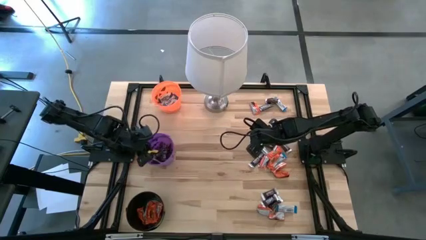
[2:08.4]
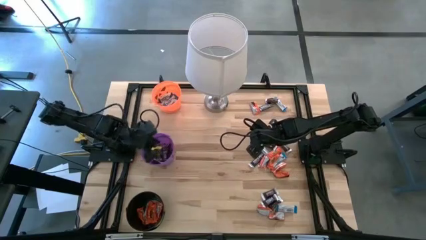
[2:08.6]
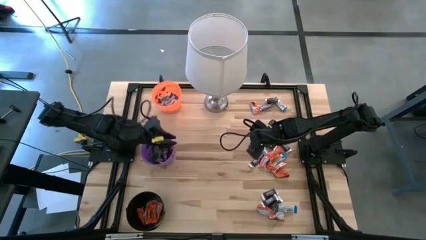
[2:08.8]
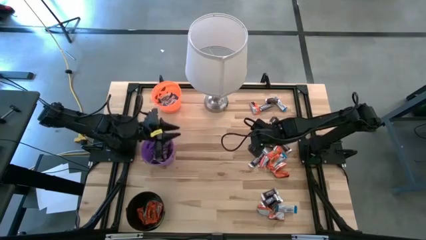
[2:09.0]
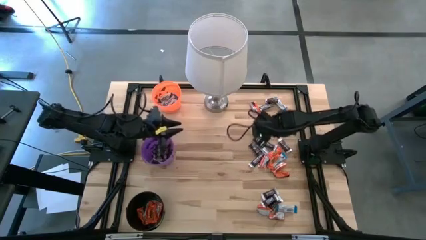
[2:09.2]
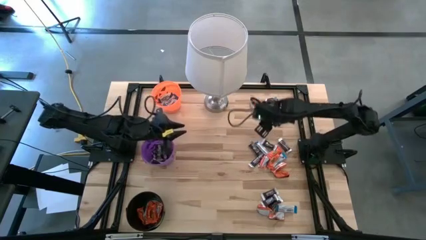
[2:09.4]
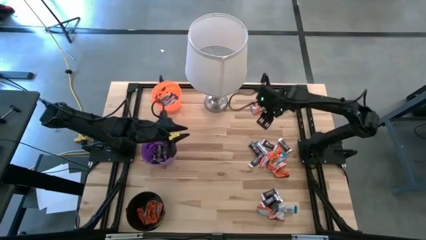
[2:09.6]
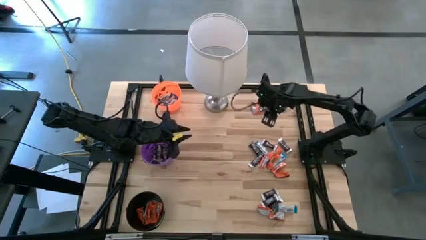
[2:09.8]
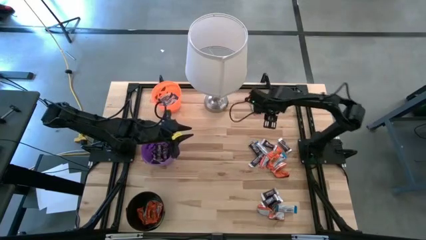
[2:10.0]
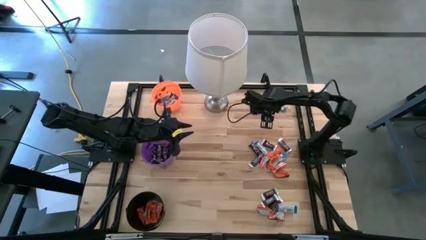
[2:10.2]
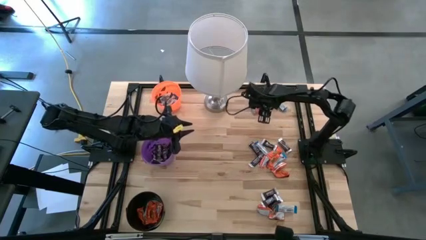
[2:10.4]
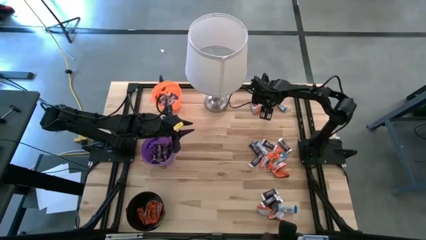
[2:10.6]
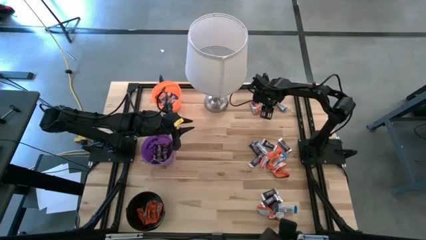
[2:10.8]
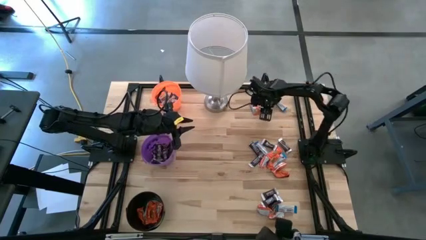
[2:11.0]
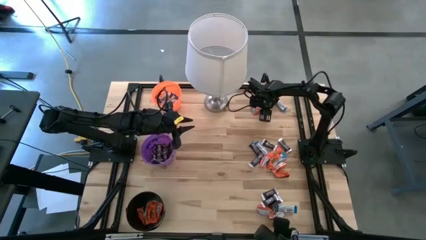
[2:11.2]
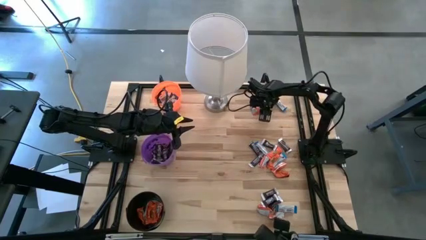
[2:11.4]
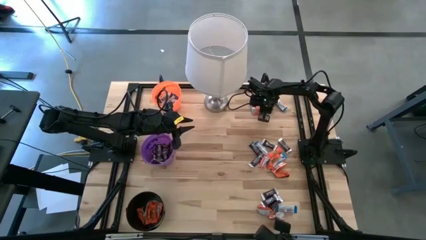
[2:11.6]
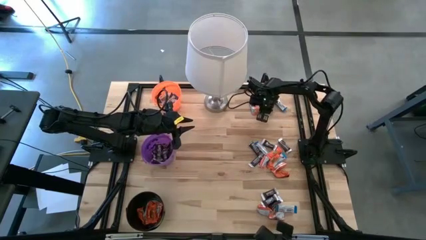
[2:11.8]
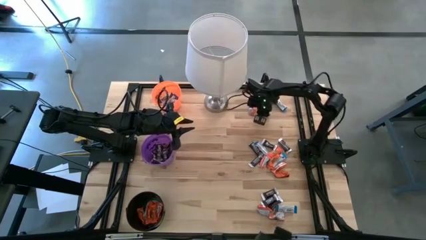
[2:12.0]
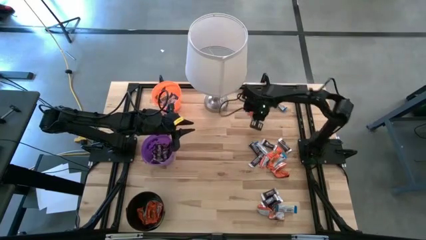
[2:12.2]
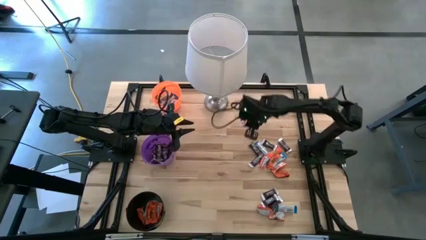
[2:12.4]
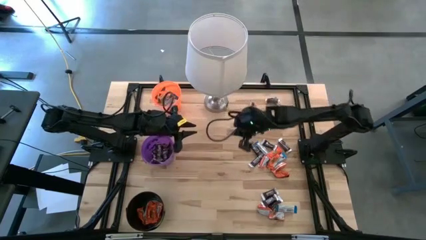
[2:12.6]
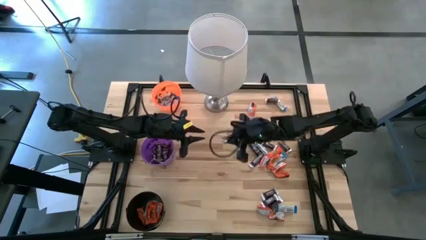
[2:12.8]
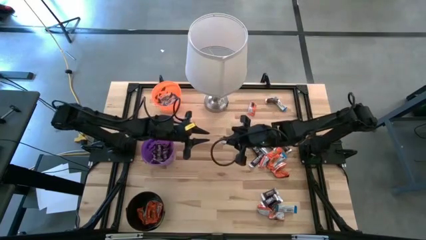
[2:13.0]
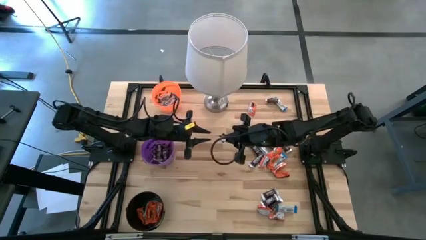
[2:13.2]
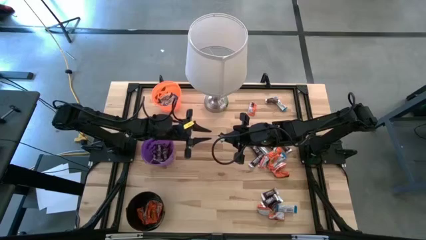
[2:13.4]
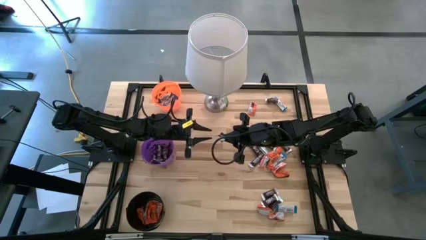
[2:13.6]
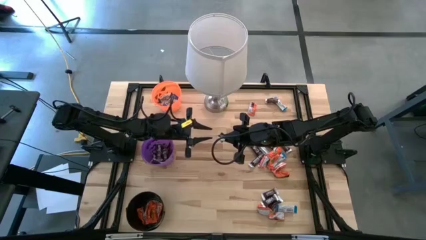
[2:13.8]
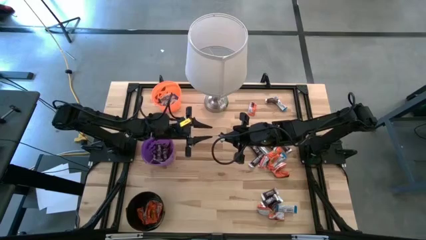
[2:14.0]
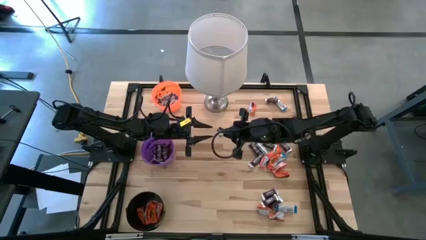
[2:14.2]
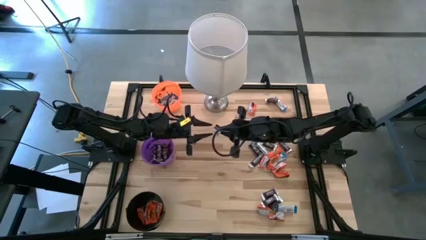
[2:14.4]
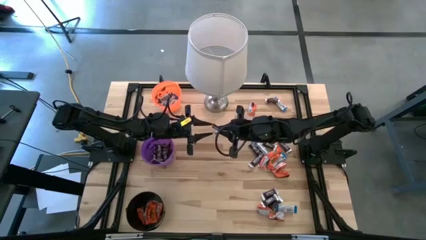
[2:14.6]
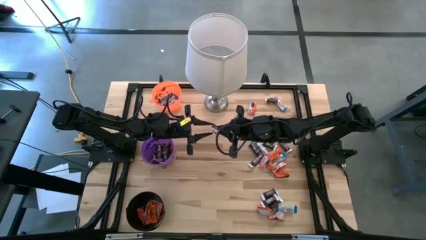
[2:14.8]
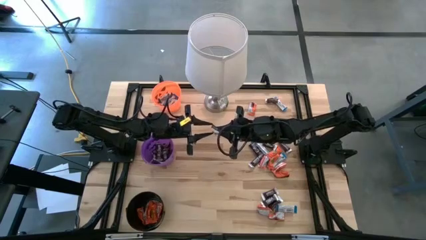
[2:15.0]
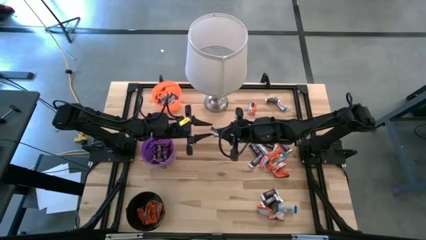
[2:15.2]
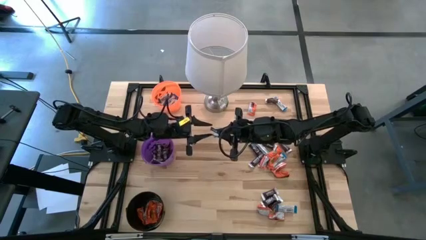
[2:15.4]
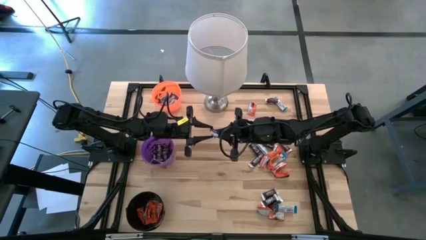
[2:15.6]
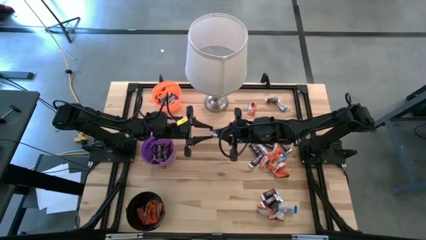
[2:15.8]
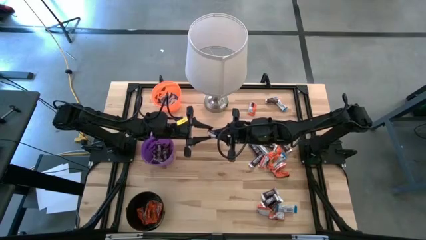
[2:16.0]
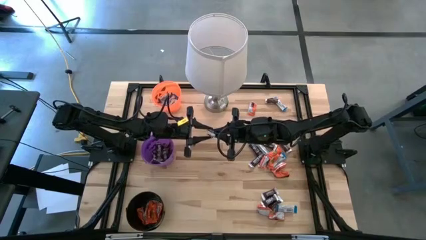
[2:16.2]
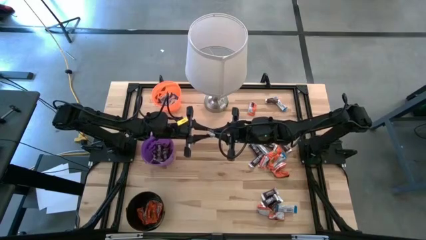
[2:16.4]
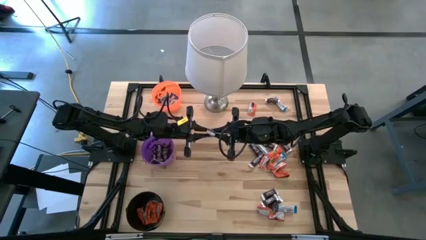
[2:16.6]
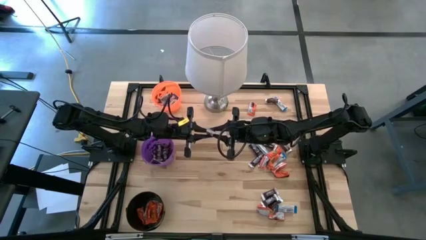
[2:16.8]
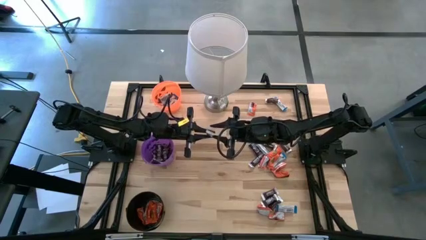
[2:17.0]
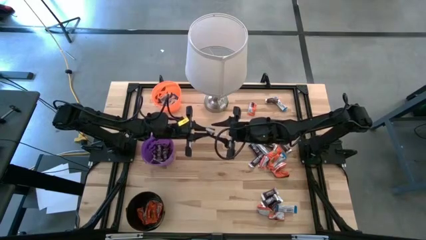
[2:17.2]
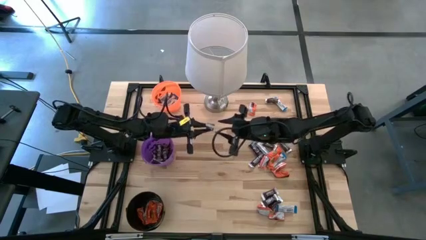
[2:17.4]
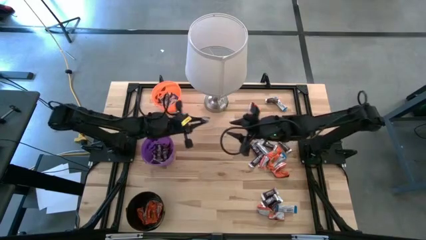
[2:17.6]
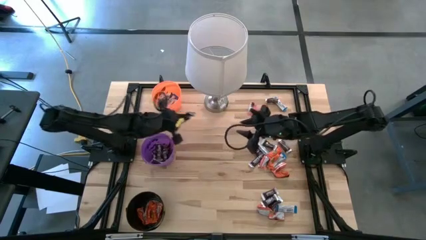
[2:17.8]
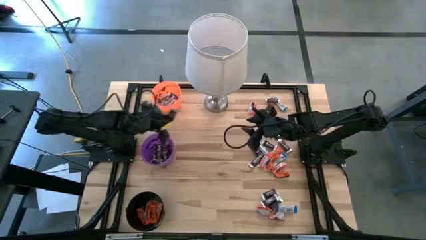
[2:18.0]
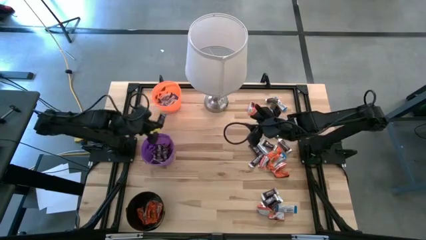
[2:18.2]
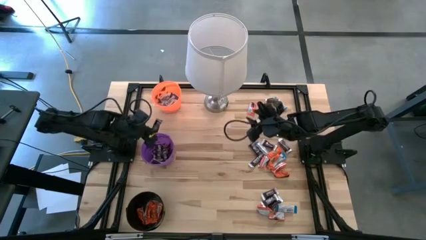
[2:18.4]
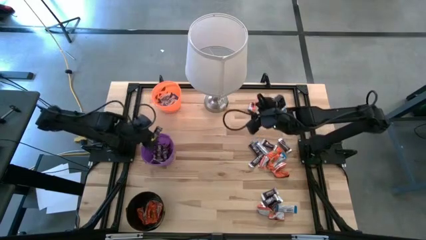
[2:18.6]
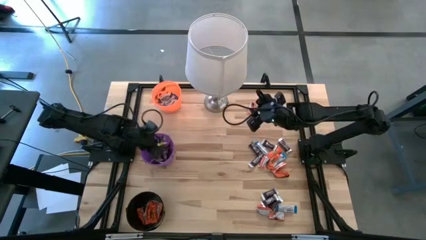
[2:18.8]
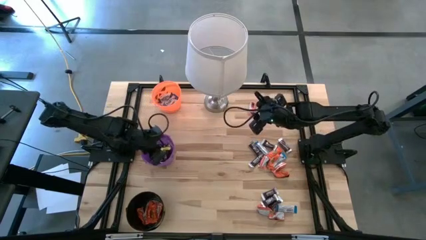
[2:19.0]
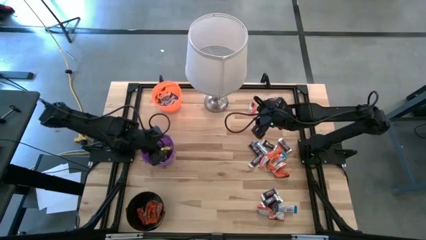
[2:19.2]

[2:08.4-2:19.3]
Task: Sort candy
Put the brown chocolate into the purple bucket

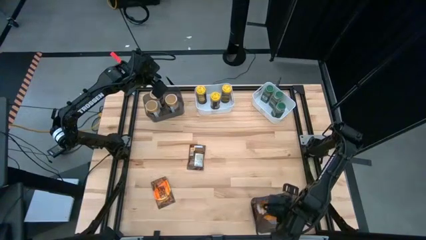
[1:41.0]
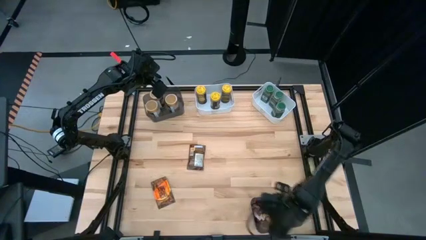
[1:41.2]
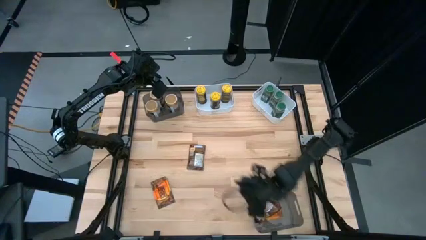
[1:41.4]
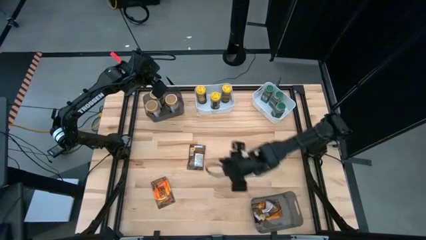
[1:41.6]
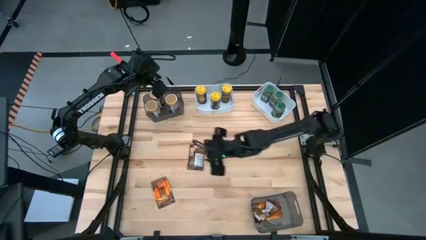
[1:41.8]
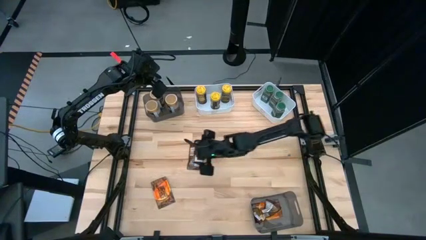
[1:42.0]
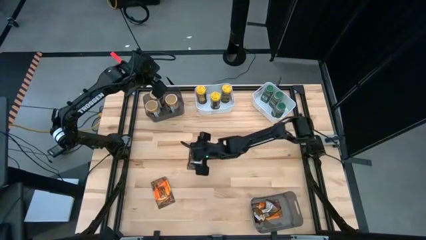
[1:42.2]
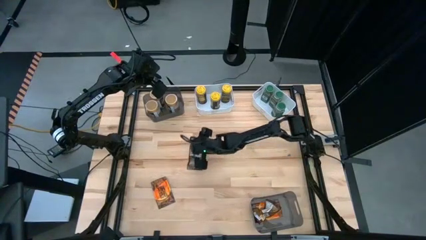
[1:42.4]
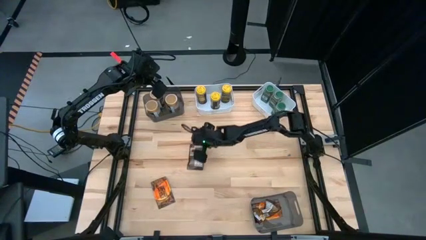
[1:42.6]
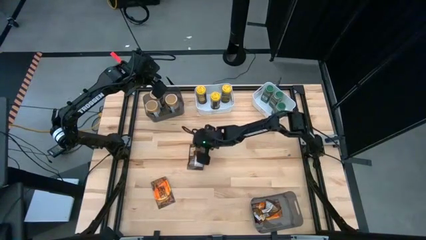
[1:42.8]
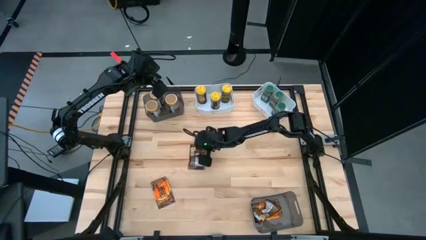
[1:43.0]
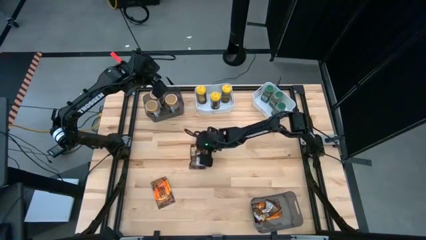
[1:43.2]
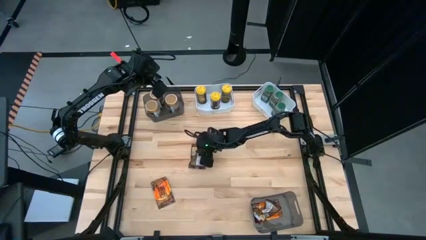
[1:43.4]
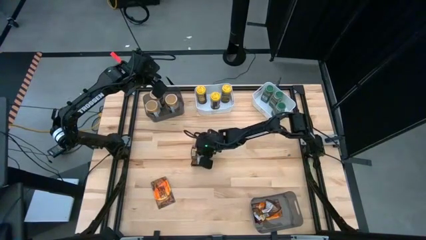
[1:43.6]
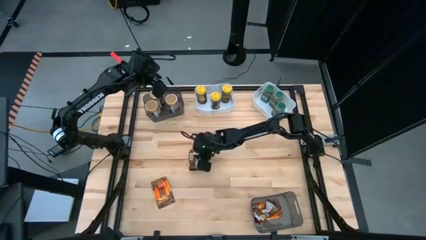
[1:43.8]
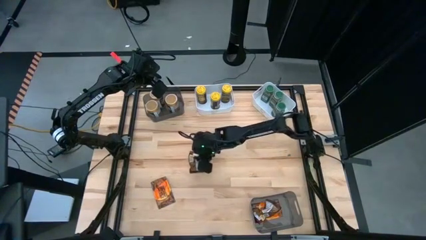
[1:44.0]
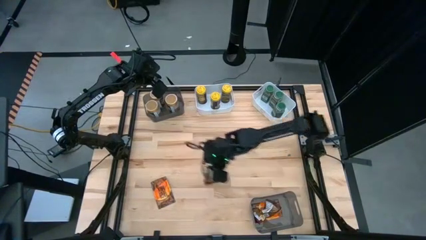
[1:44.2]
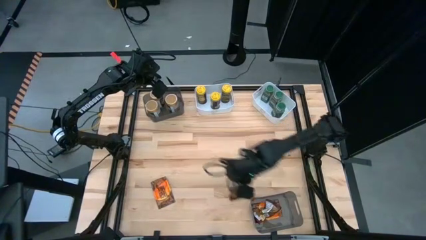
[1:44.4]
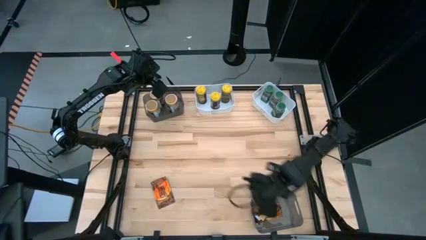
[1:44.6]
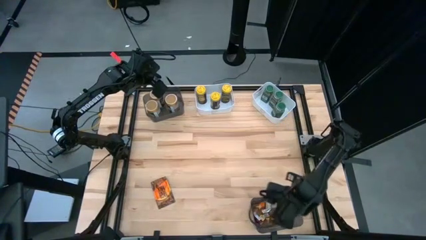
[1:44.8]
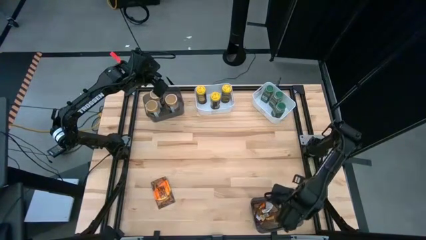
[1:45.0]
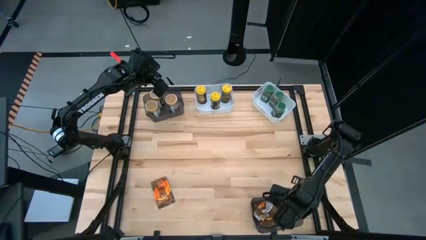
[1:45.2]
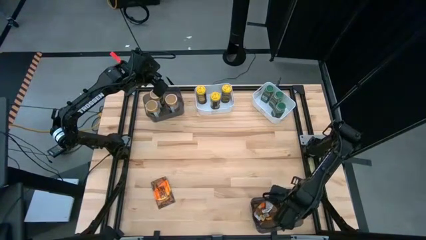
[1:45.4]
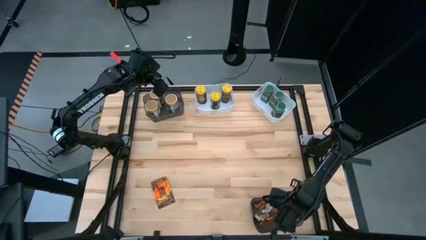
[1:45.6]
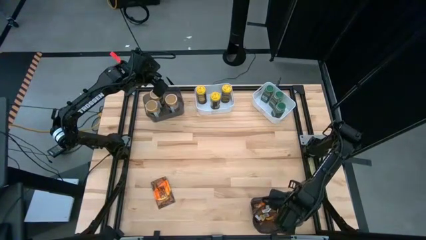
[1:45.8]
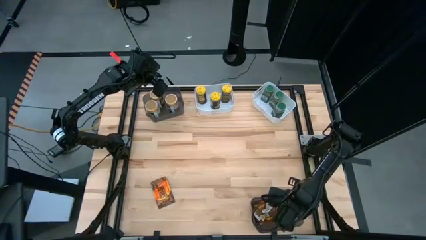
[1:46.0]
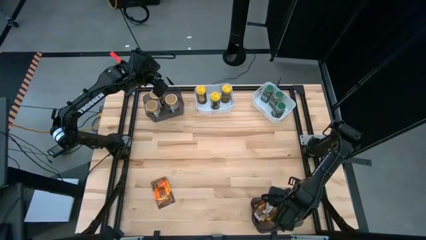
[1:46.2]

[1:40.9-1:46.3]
Task: Sort spices by type
Put the orange seasoning pack into the bottom black bin

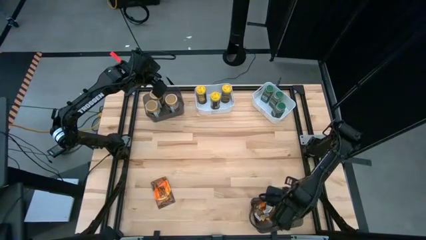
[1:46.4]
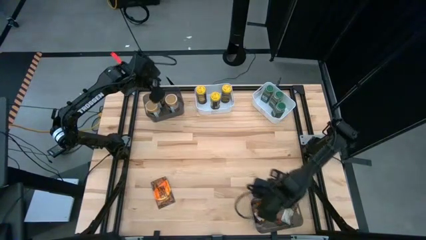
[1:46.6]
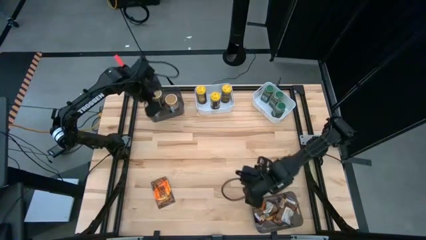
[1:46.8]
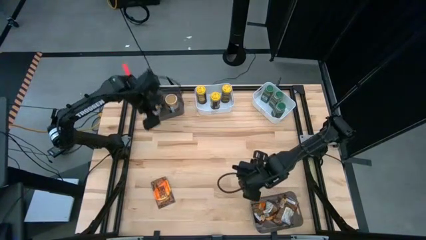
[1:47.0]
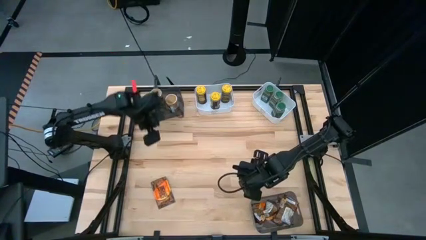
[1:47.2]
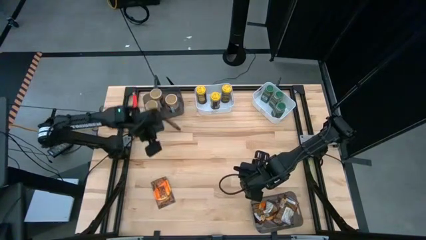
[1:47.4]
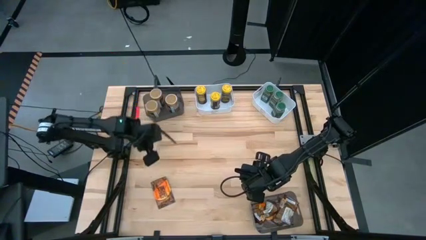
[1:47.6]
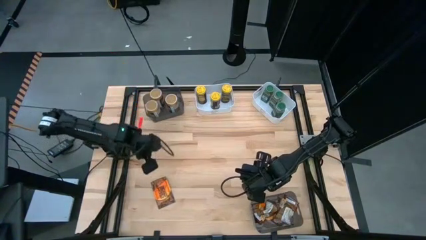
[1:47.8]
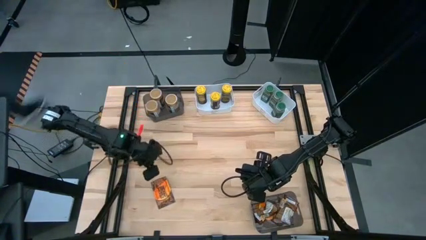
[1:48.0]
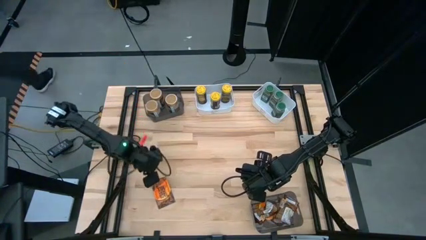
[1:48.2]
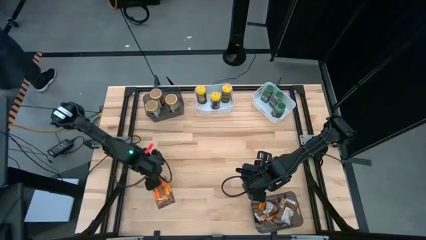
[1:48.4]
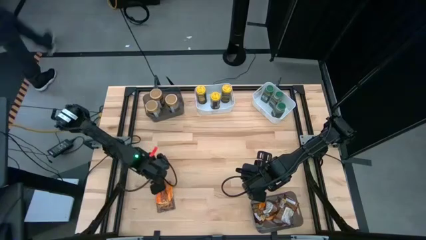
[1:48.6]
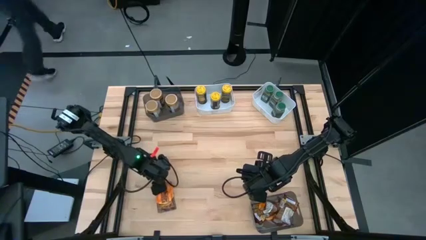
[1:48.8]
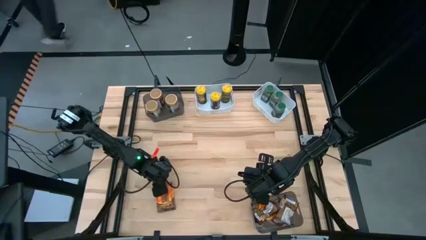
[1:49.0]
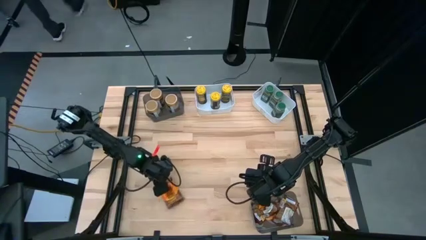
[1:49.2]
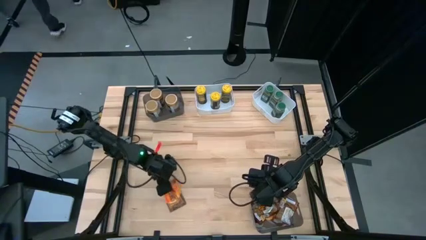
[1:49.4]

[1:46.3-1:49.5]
Put the orange seasoning pack into the bottom black bin
